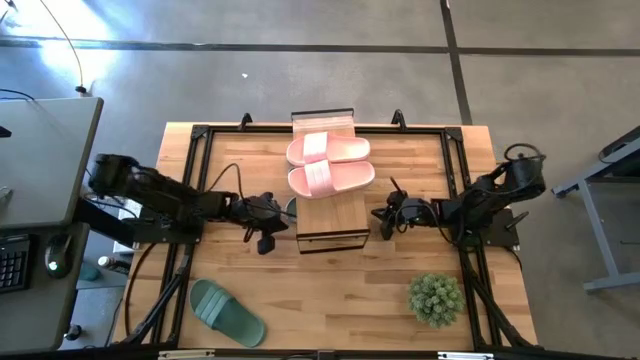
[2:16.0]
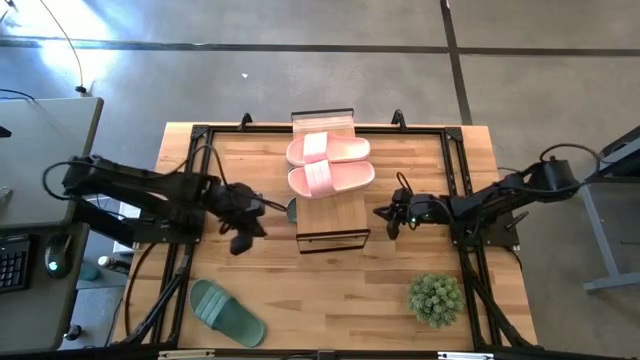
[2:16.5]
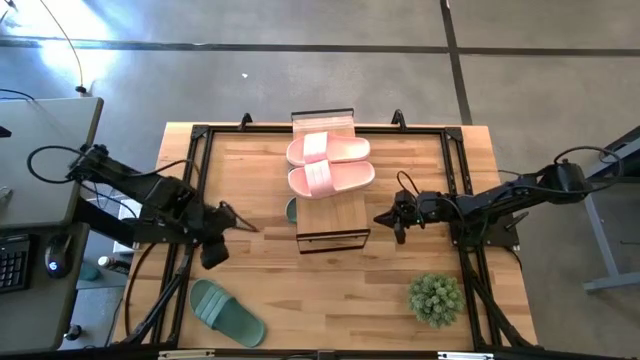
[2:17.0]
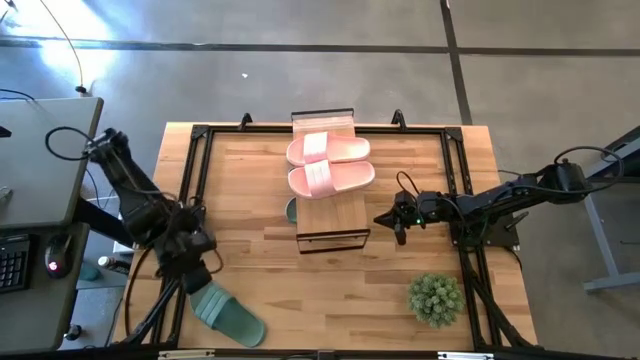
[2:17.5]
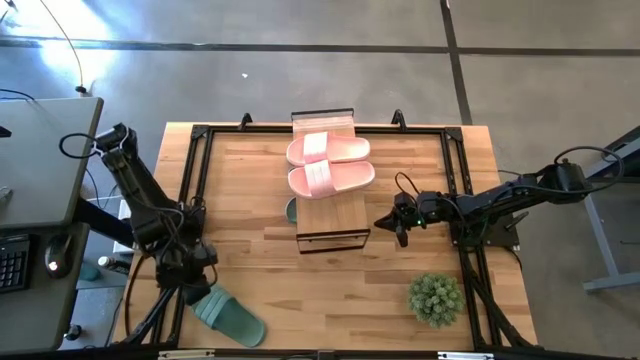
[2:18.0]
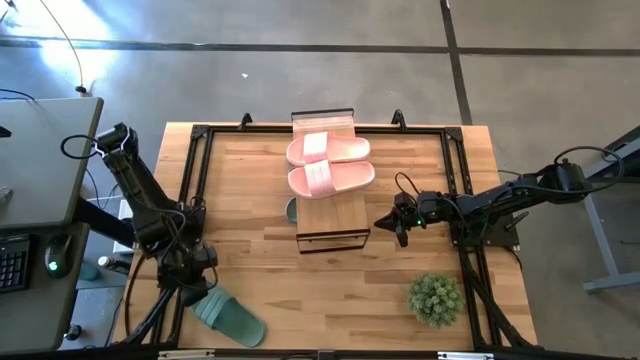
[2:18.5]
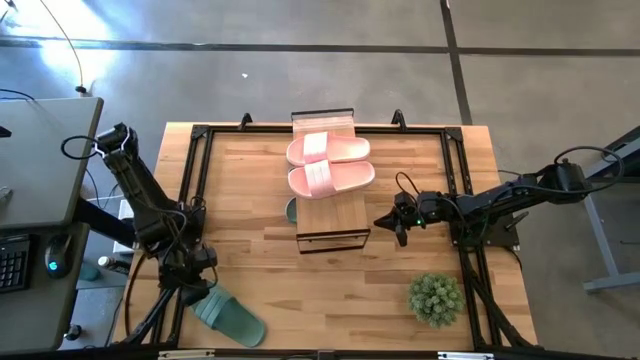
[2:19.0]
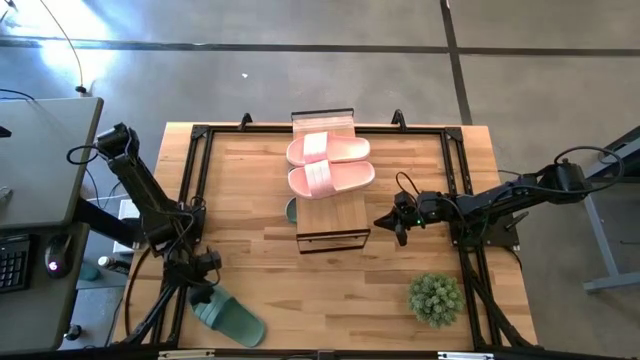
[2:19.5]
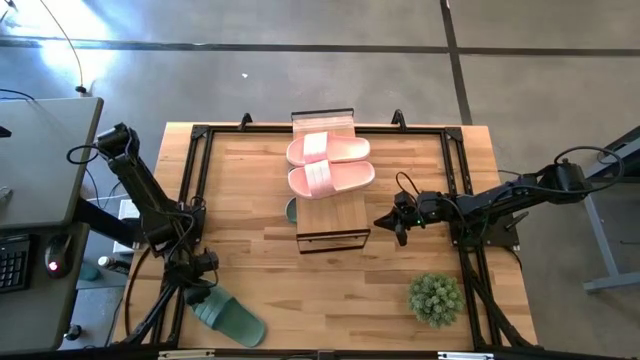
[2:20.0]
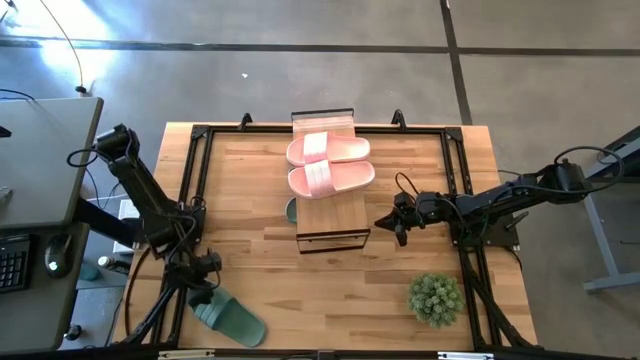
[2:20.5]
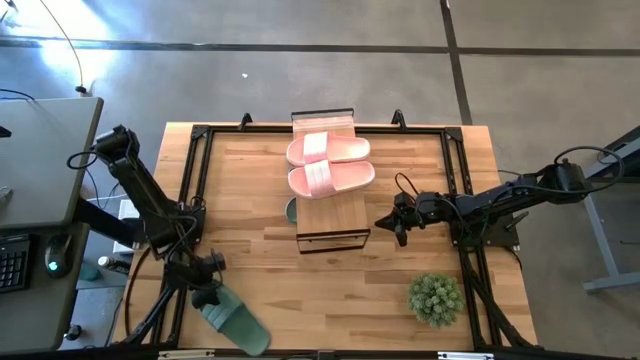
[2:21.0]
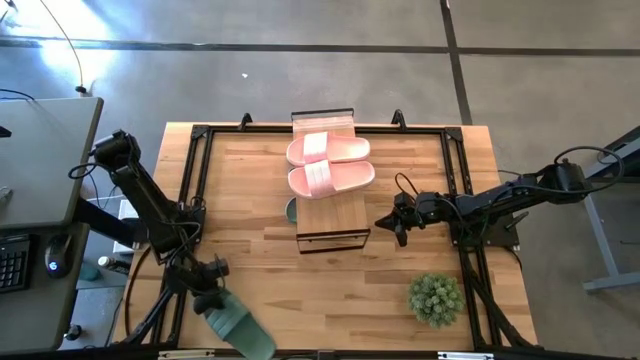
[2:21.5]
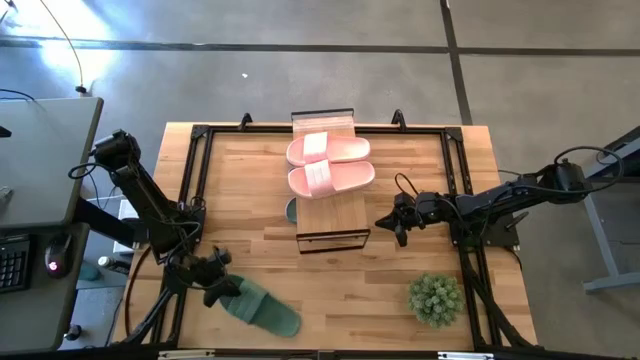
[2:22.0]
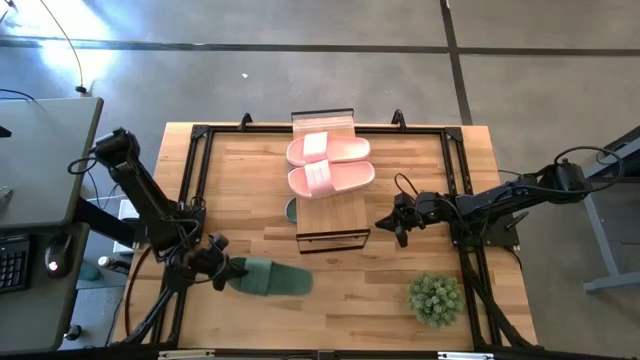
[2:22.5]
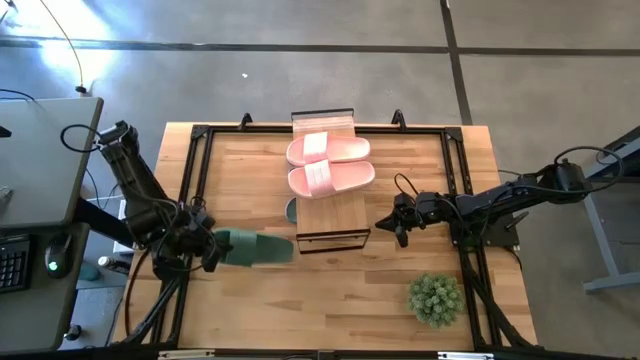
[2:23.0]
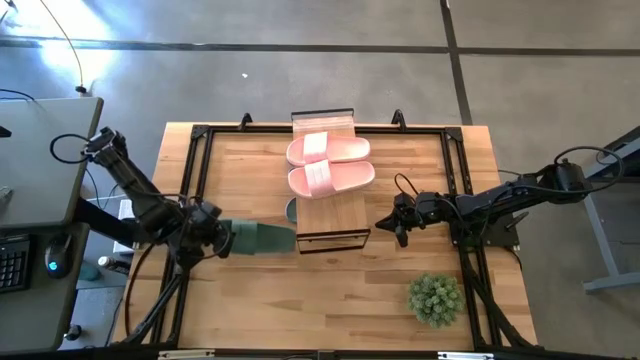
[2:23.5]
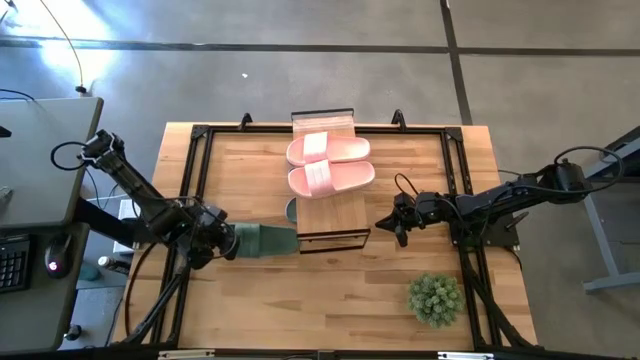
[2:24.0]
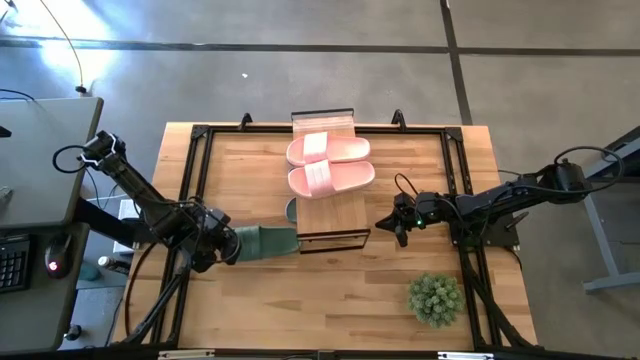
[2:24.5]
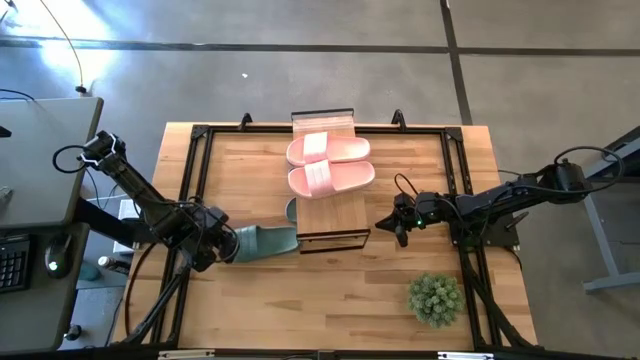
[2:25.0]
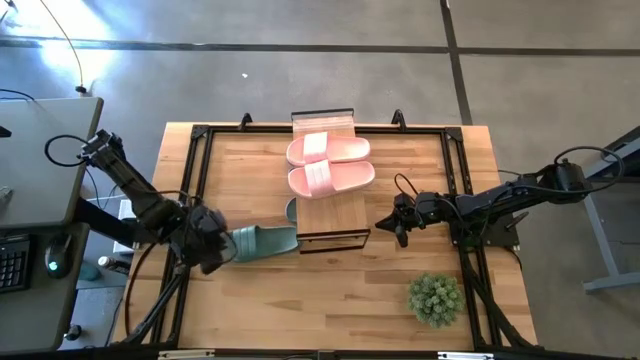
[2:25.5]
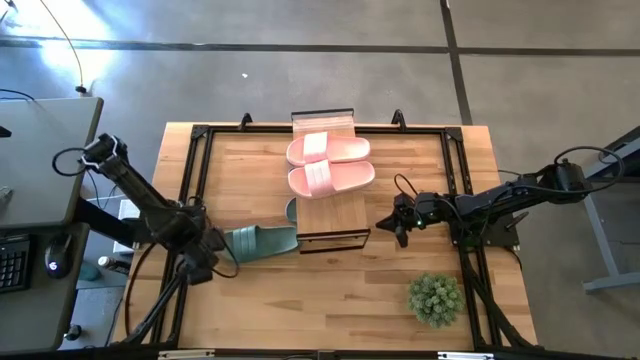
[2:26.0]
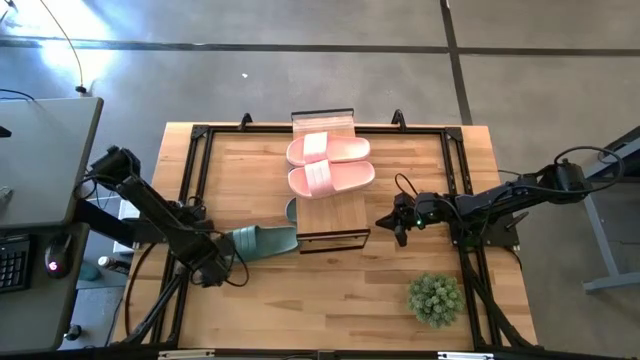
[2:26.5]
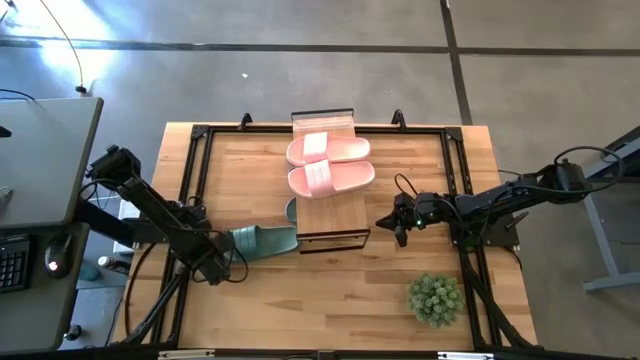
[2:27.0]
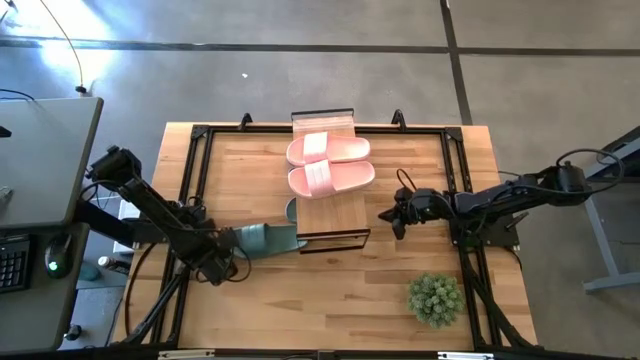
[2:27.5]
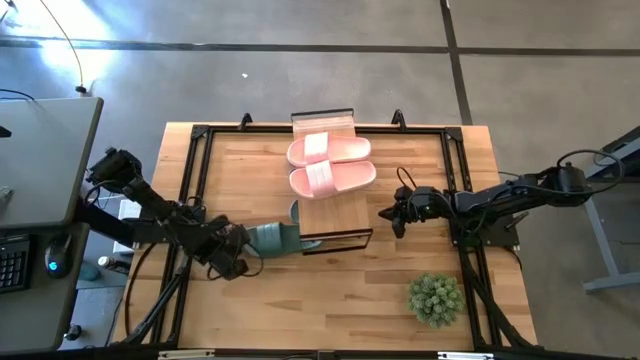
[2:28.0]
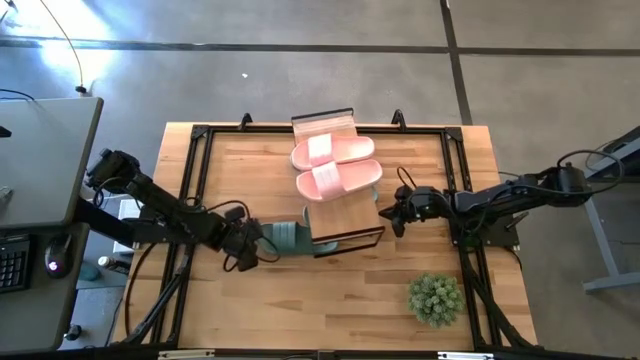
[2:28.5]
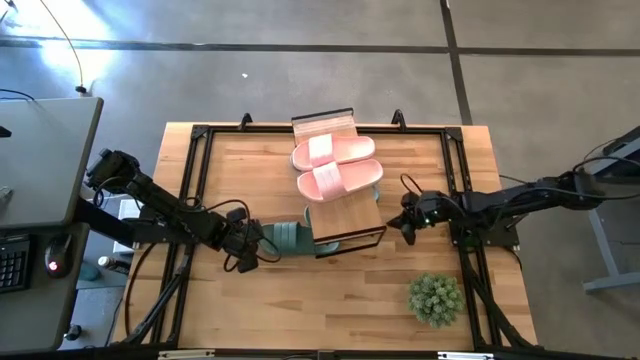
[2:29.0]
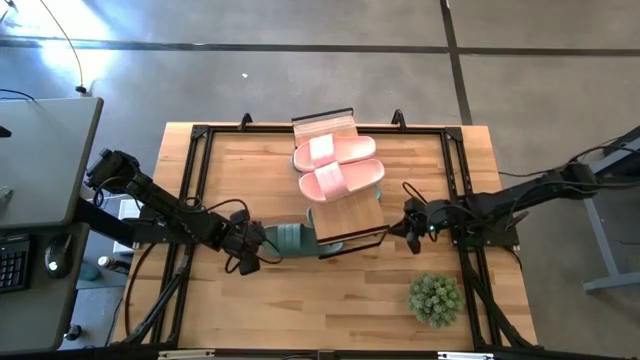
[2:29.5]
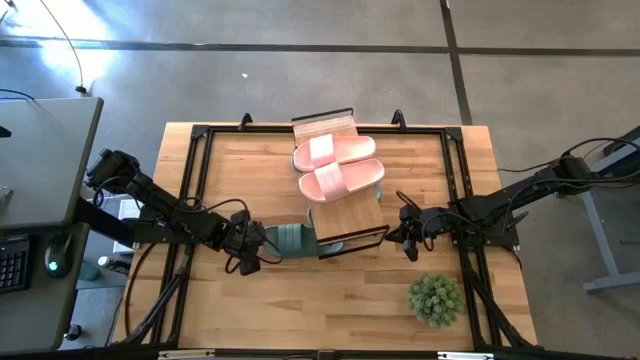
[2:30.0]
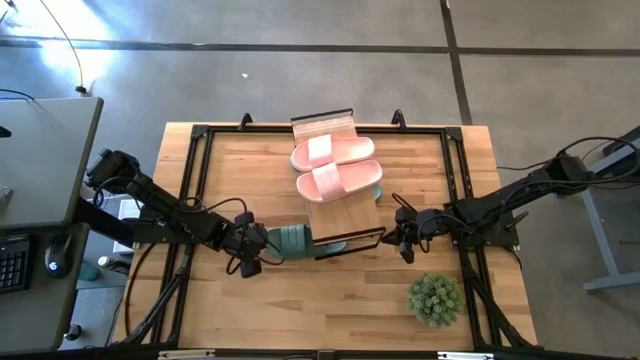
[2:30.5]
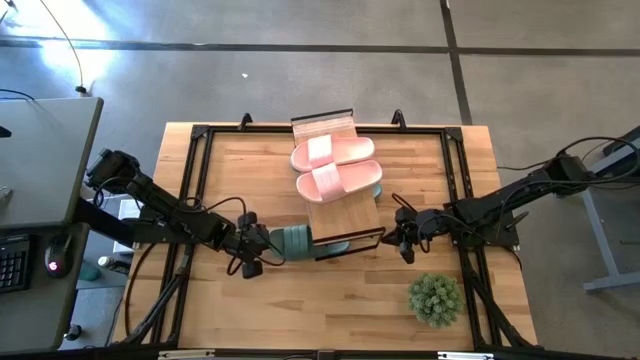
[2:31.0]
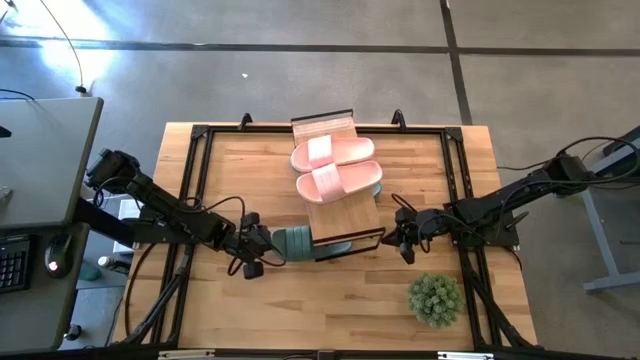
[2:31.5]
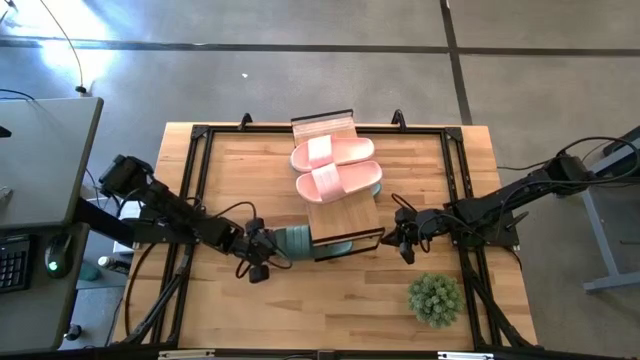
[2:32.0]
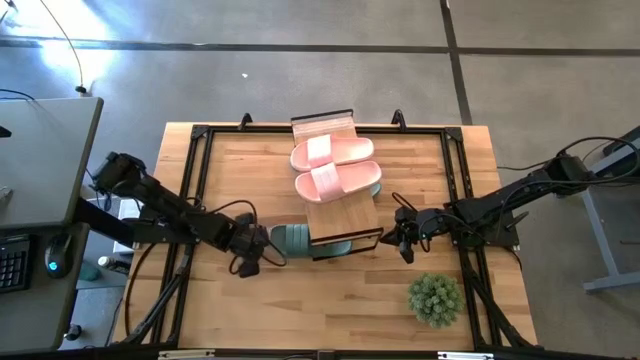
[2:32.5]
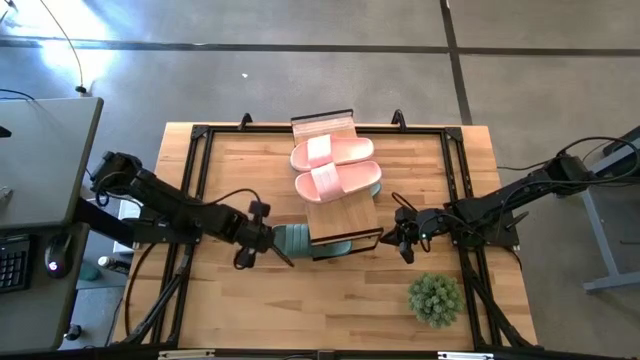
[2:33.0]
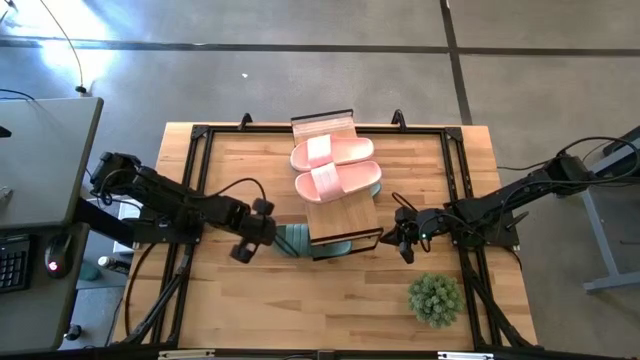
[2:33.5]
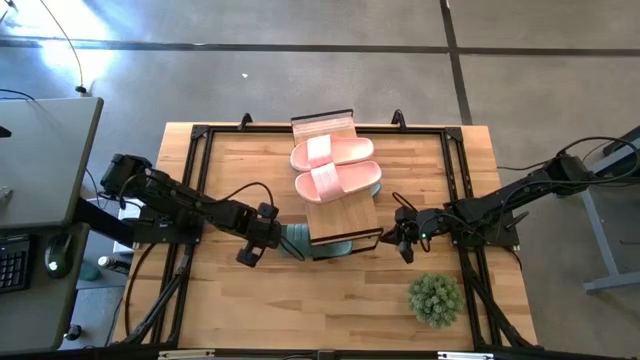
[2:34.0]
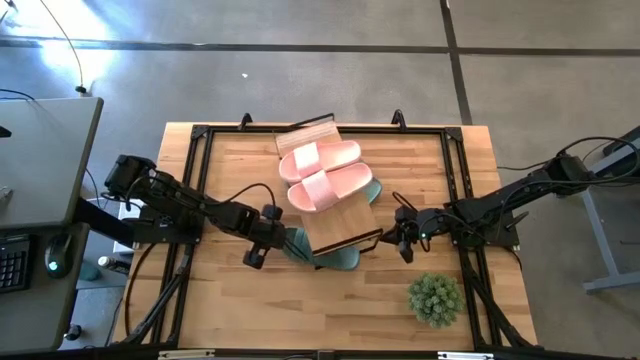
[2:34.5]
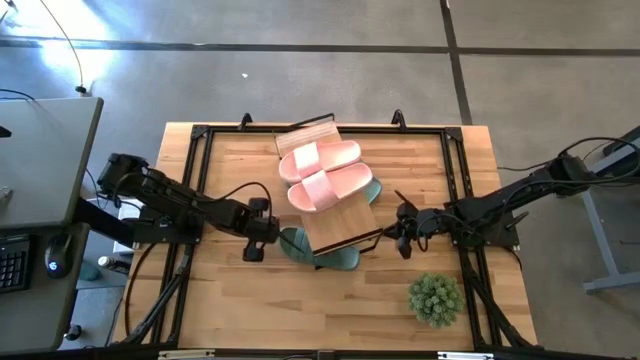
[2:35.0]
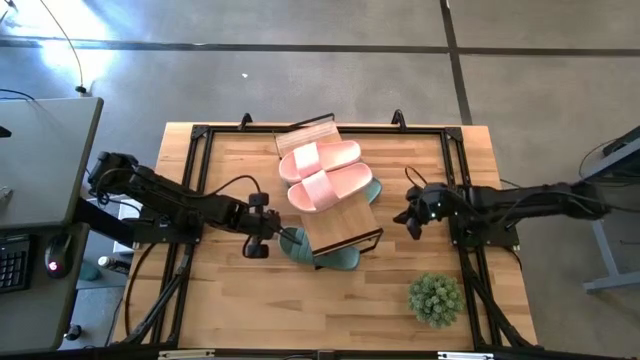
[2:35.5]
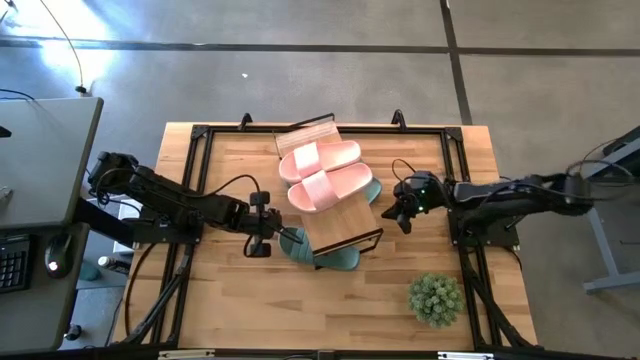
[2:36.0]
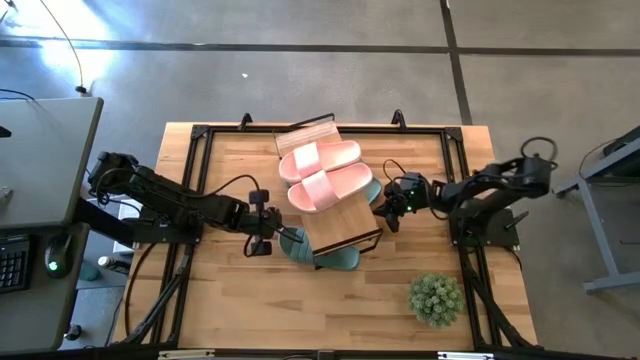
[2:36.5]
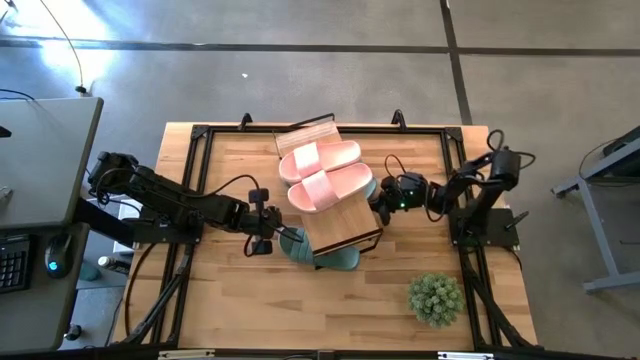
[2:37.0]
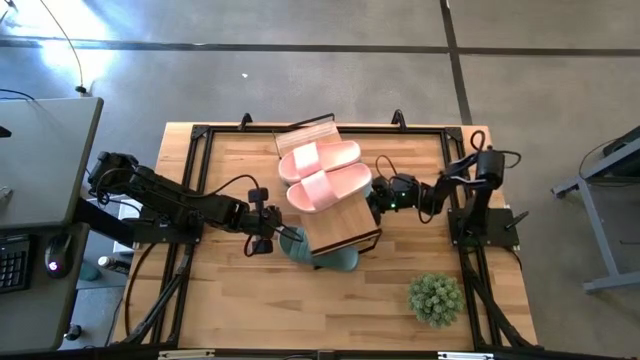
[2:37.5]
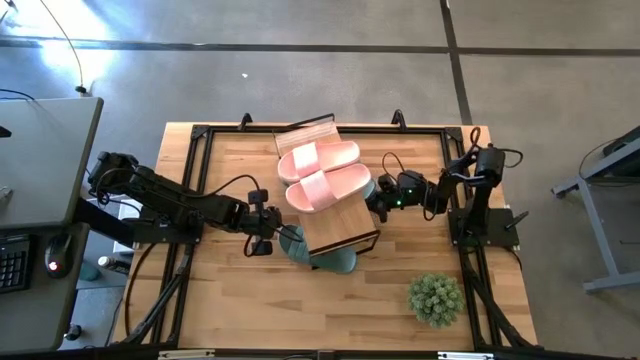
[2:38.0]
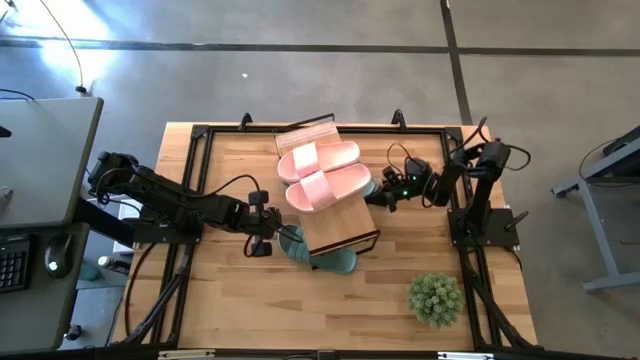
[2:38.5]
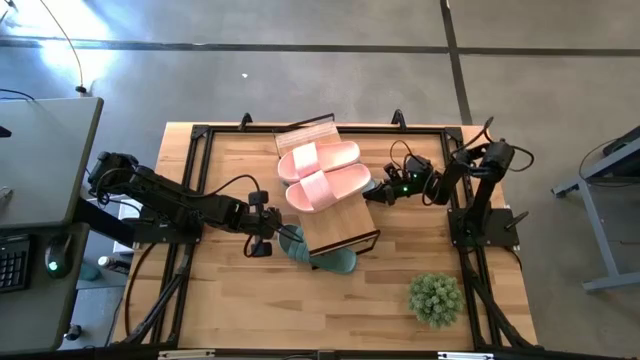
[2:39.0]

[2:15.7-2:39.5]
Task: Pick and place slides into the shelf
Put the green slide under the shelf
